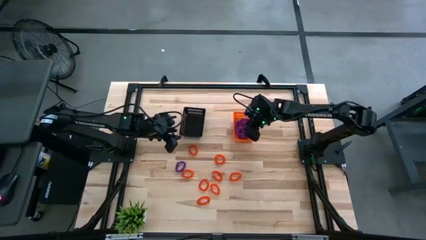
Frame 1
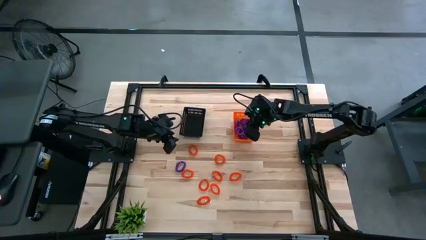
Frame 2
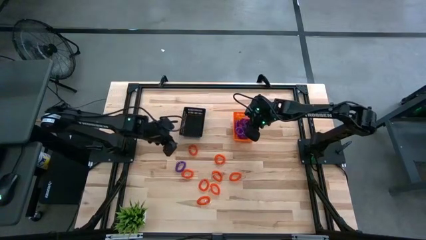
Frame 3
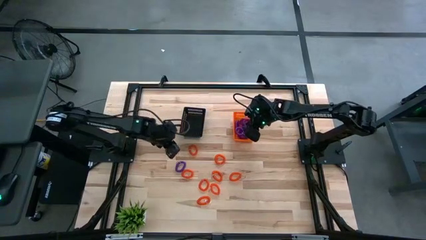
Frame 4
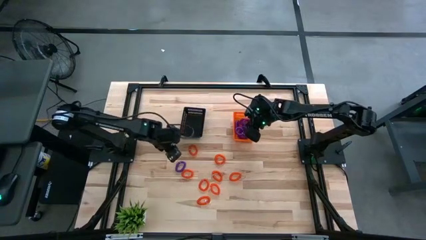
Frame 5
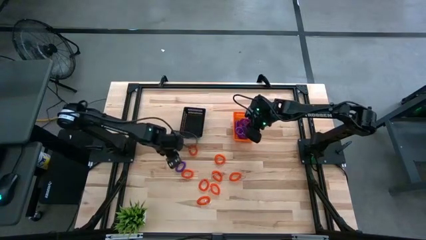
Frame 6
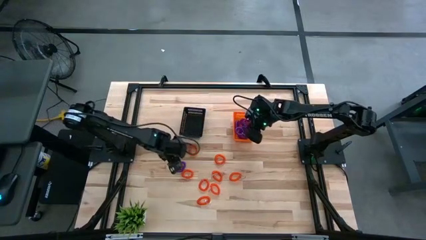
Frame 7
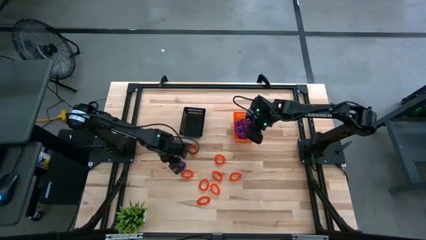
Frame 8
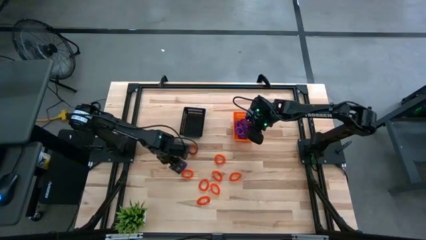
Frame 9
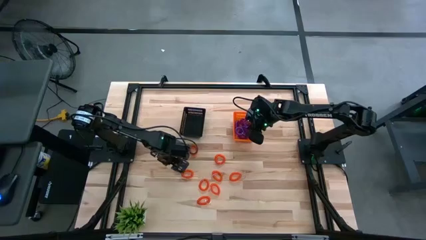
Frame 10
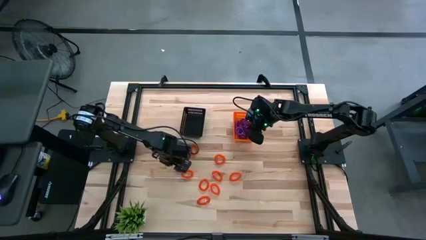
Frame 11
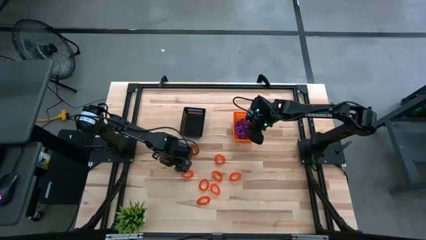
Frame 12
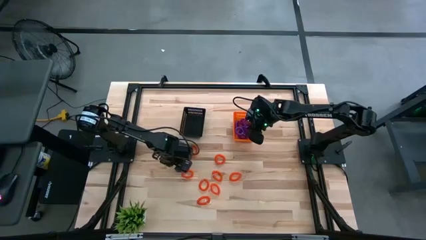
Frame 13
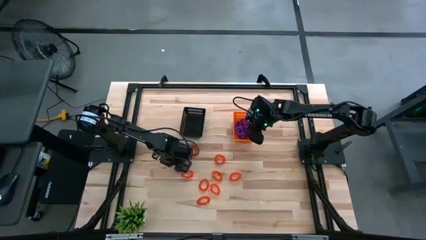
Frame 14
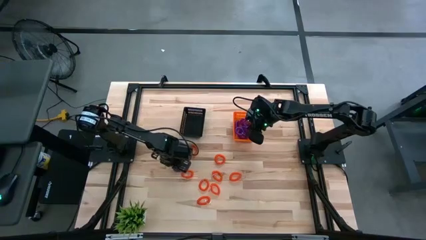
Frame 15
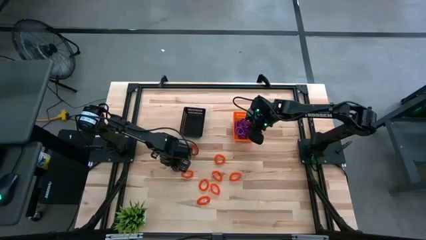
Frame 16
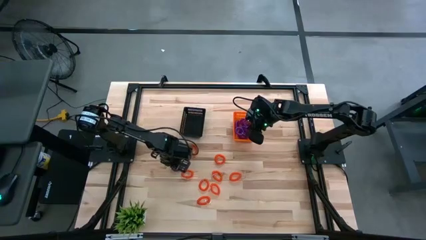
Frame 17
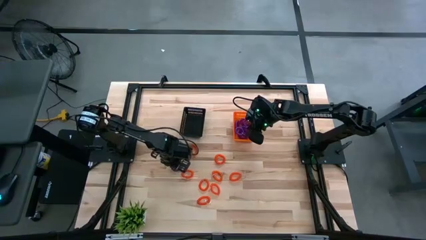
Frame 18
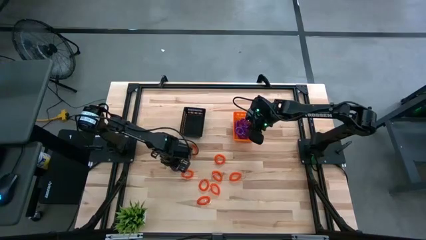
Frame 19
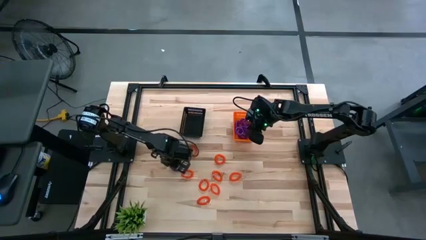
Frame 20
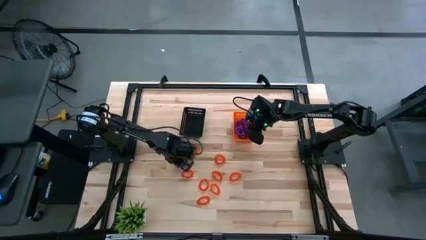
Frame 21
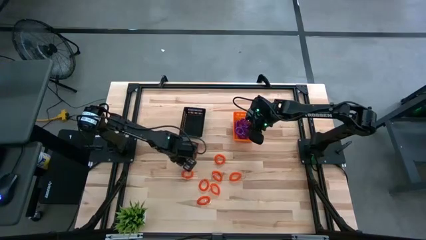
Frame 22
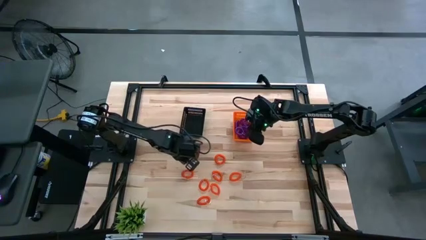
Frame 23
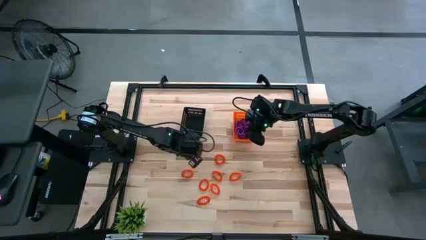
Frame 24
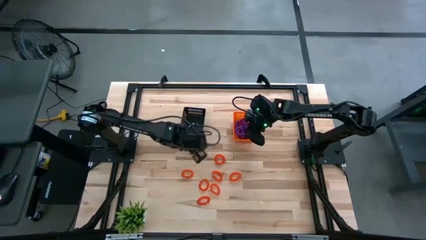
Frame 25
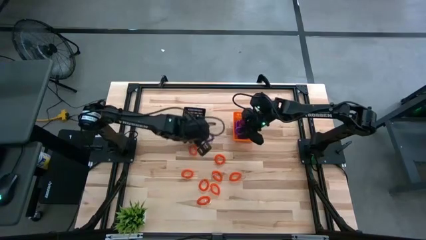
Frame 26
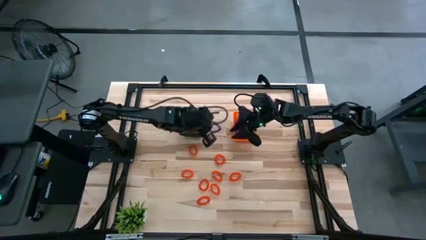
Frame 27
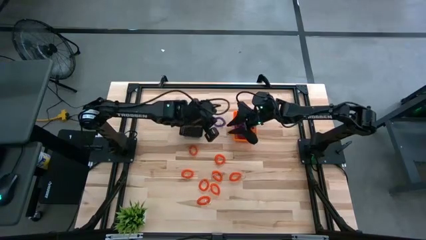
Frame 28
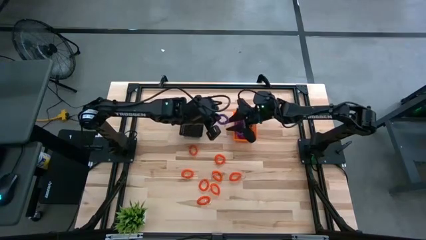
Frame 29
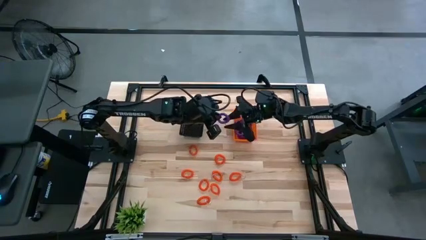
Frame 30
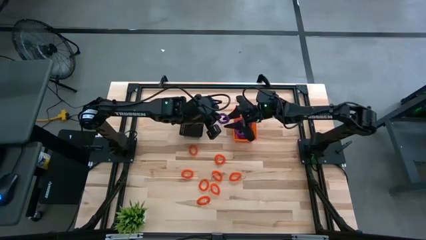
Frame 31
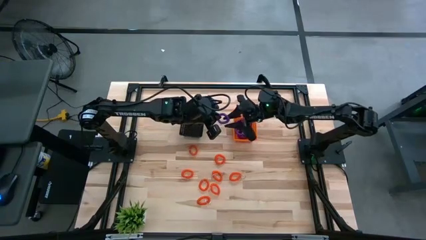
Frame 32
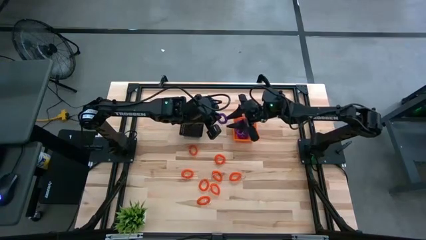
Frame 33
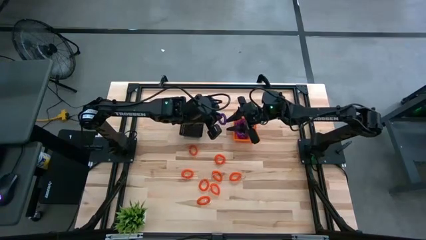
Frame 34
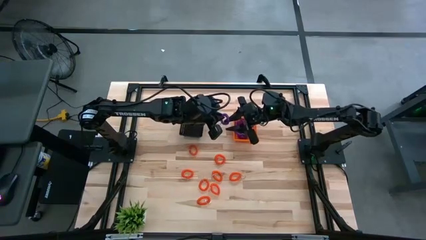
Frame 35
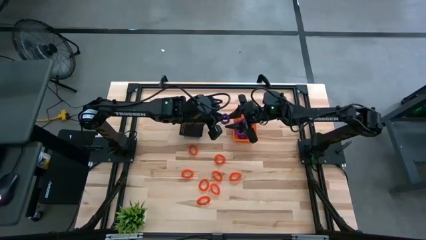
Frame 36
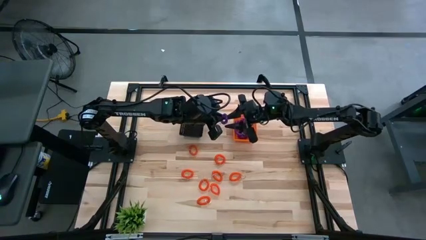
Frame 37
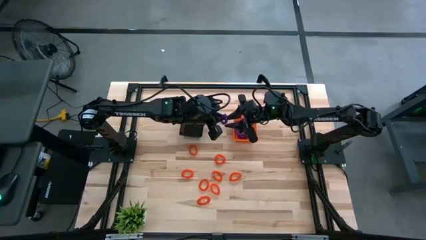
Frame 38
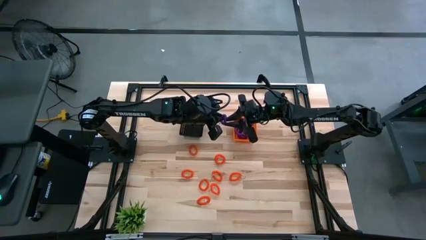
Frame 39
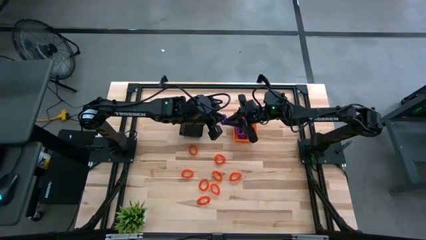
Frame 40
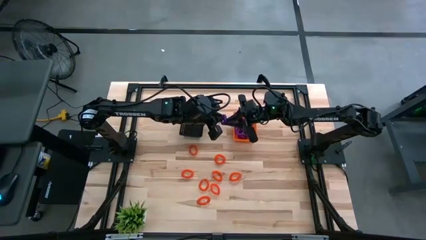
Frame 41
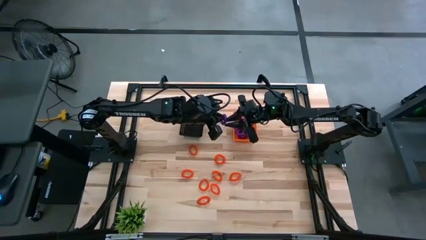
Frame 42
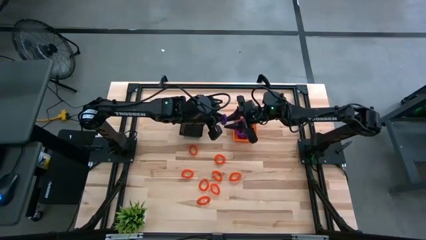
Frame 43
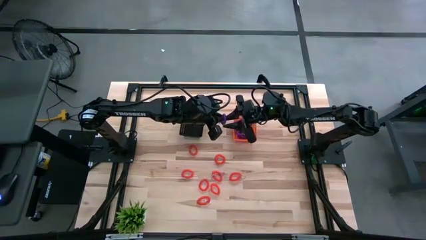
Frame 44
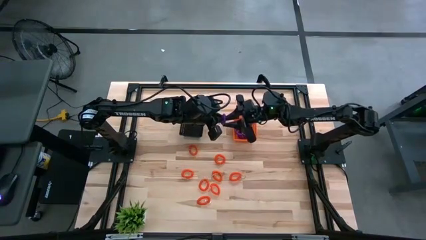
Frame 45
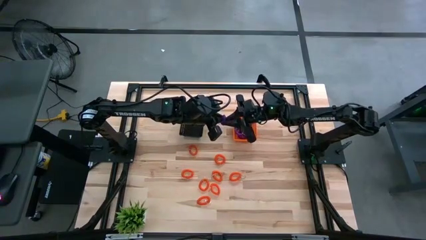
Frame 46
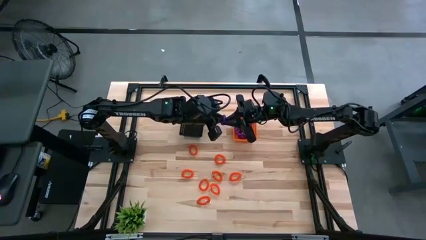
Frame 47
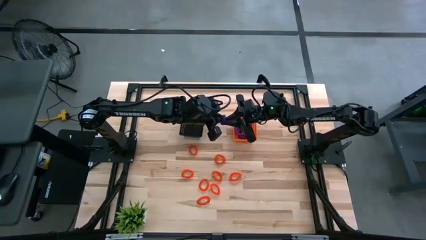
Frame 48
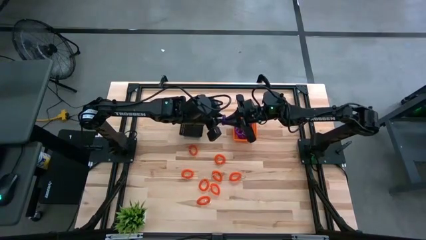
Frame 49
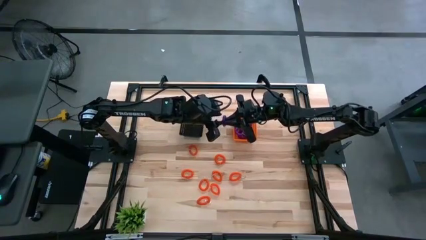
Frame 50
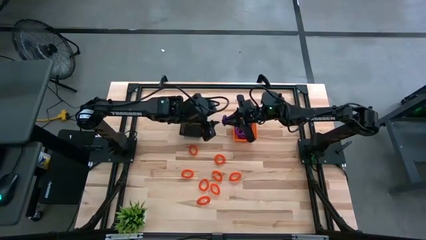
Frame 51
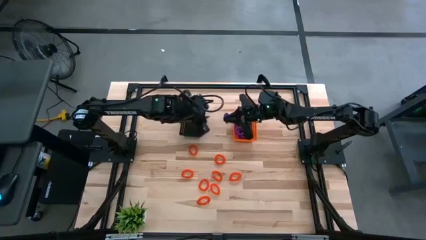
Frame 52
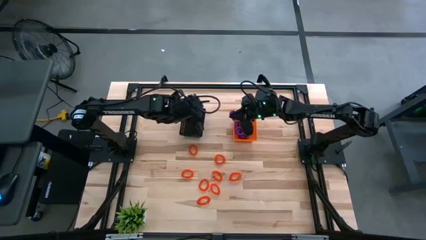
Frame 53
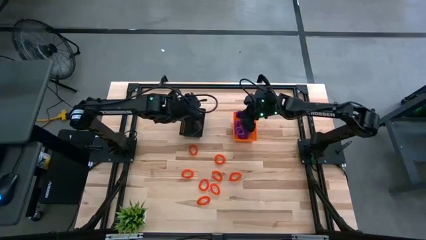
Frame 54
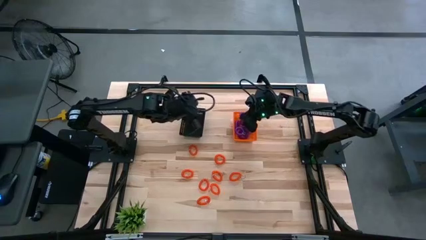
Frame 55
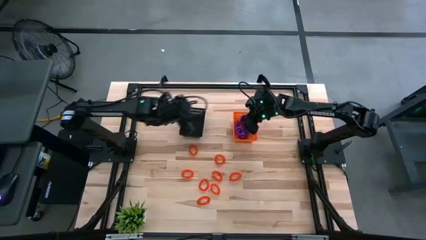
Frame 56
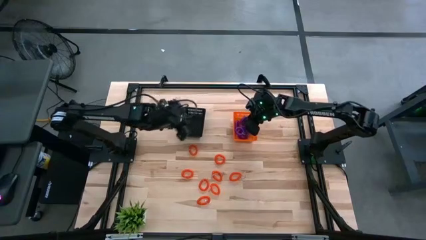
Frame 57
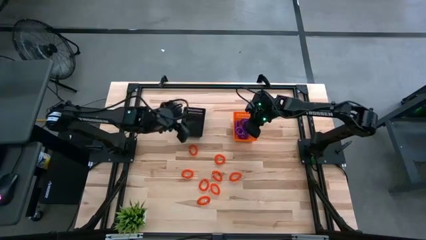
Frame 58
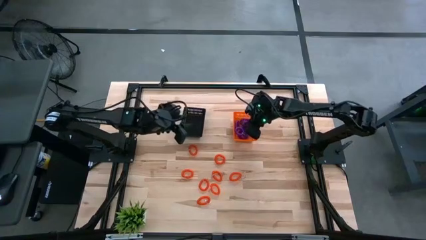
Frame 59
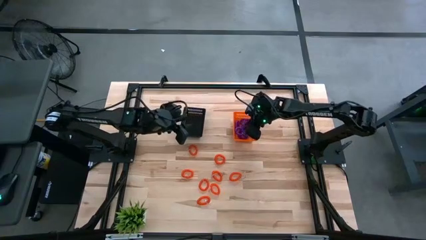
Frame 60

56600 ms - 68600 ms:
Task: Sort spring keychains into baskets
Put the violet spring keychain into the orange basket

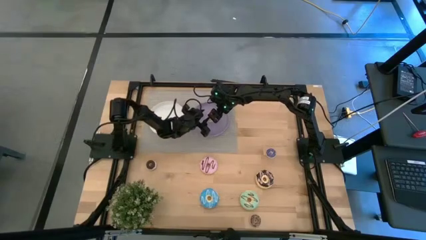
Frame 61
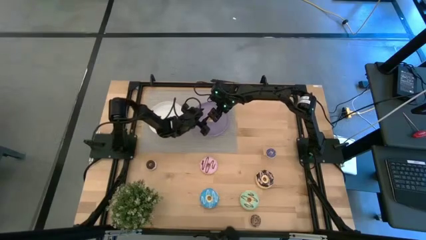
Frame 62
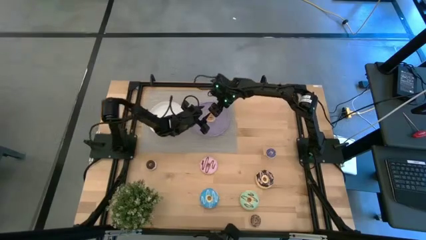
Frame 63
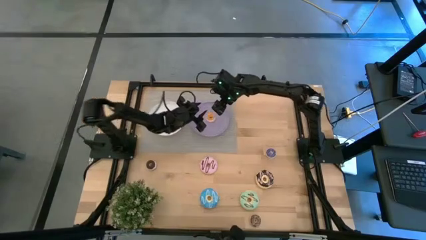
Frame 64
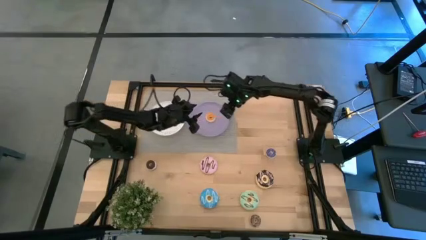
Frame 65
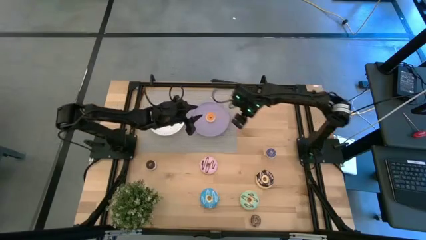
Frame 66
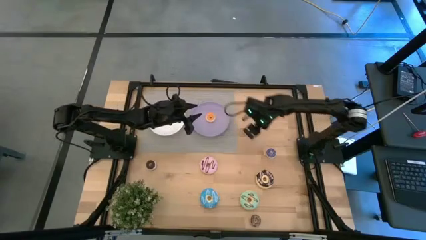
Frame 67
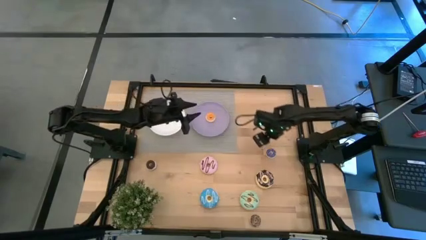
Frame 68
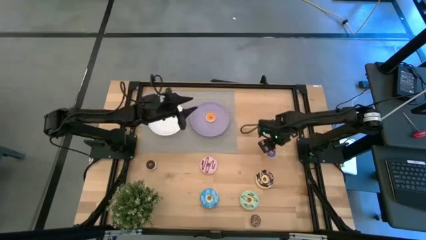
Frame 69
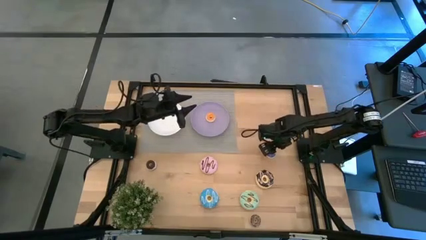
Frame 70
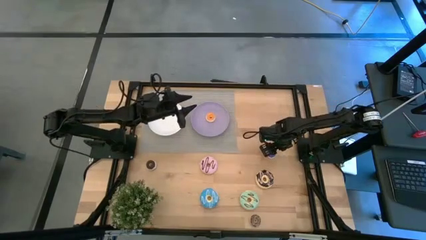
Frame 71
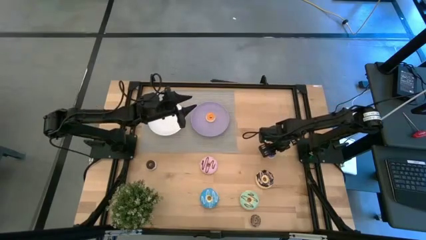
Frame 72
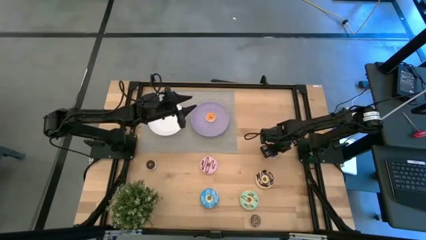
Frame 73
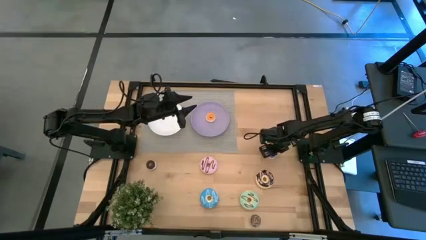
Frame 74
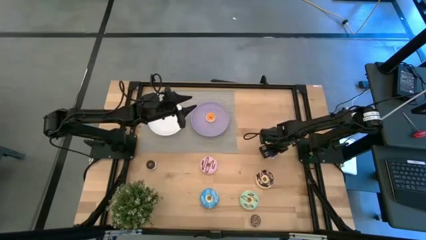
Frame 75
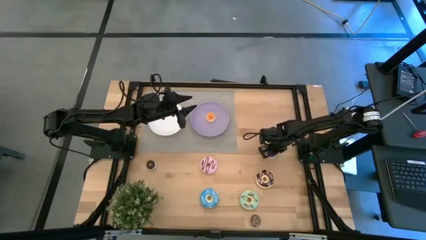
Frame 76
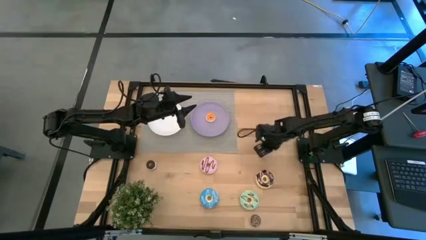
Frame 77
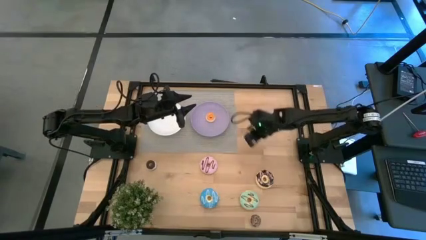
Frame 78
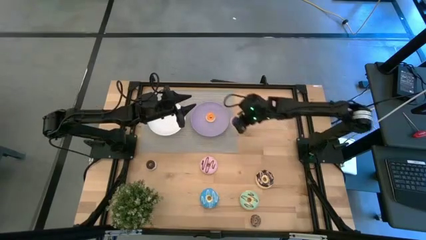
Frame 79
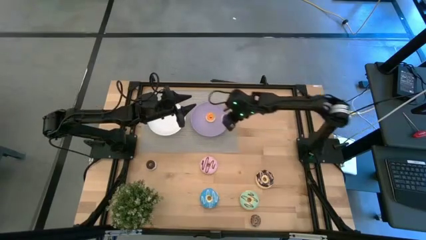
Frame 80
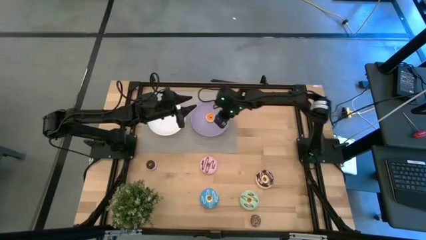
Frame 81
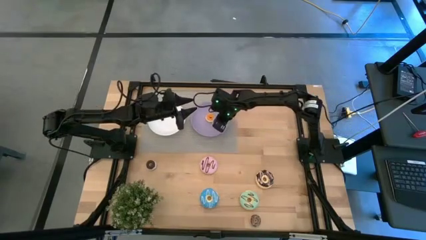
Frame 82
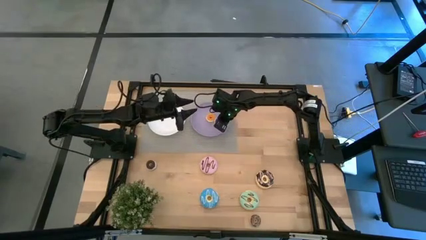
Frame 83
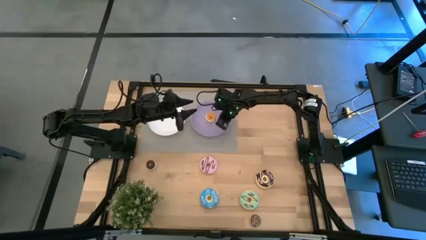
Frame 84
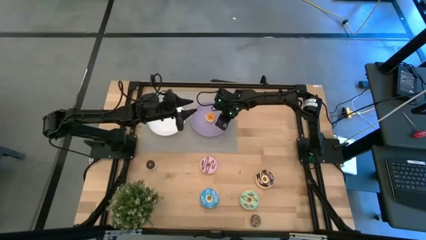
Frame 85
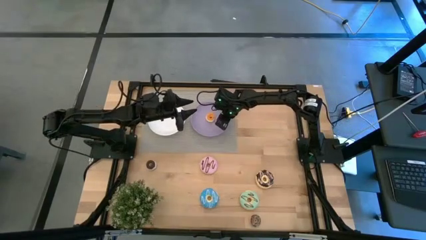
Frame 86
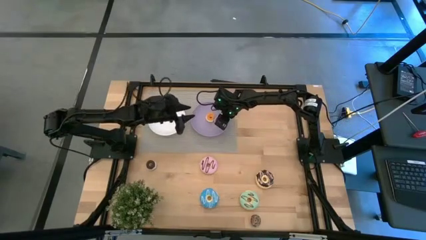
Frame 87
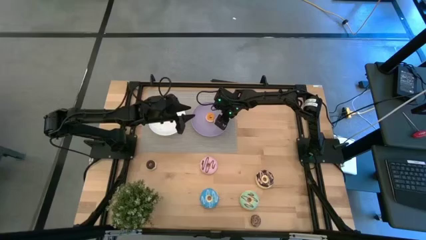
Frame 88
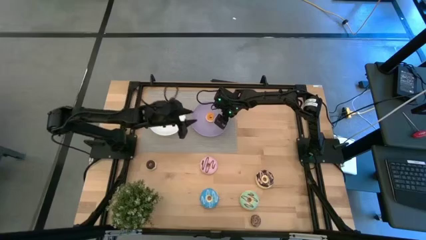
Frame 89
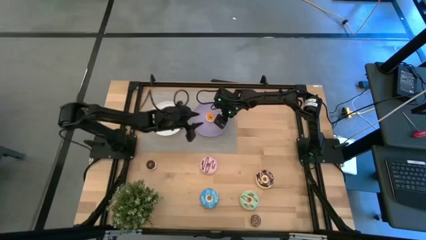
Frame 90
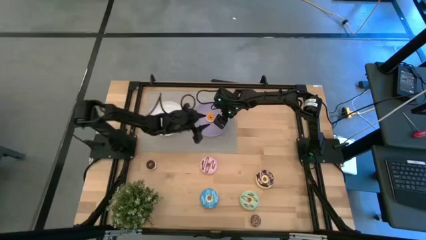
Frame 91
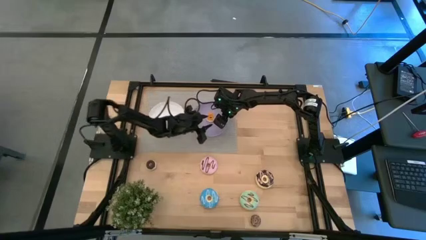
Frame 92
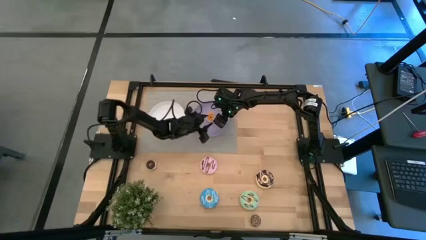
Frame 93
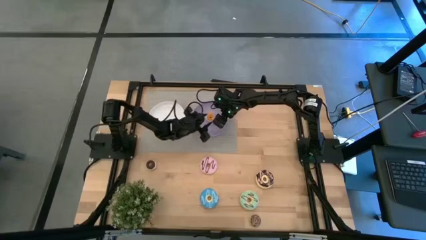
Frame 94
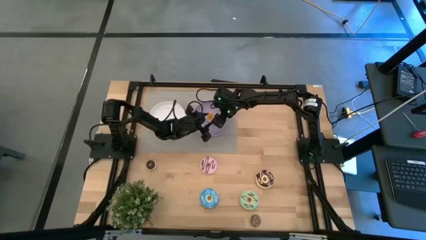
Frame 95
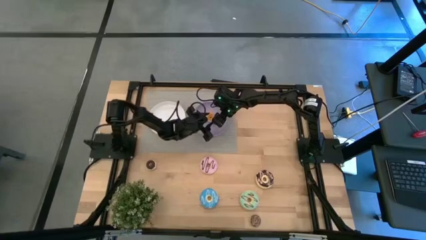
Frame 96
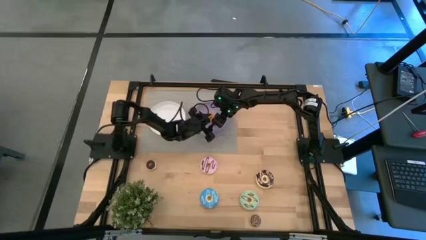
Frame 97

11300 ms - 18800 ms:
Task: Pick & Place donuts
Put the small blue donut on the purple plate
